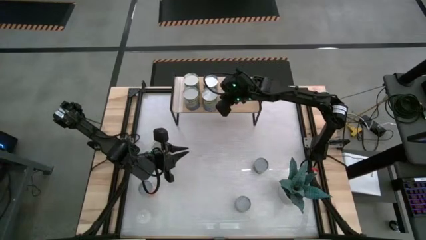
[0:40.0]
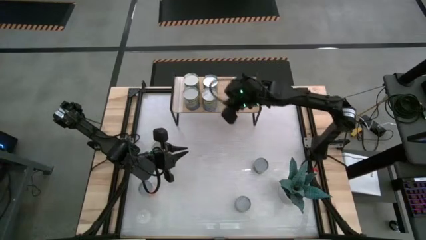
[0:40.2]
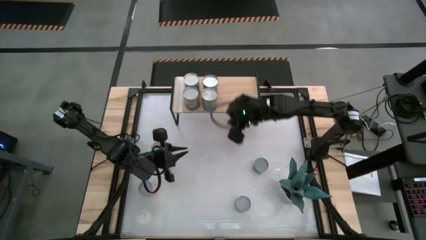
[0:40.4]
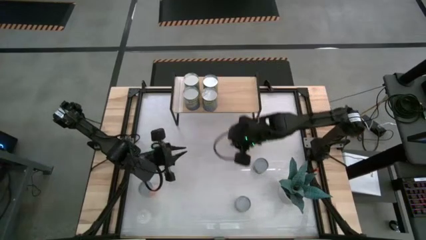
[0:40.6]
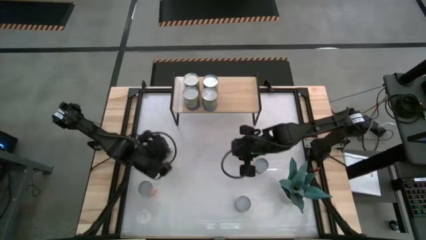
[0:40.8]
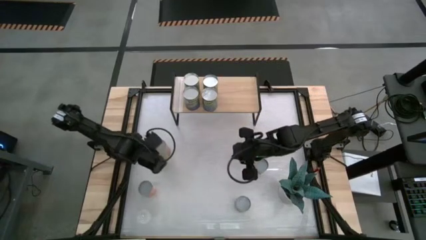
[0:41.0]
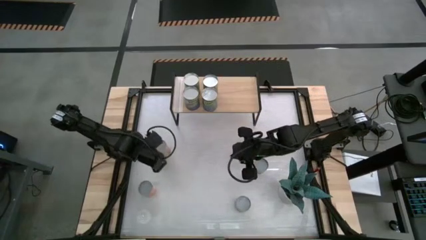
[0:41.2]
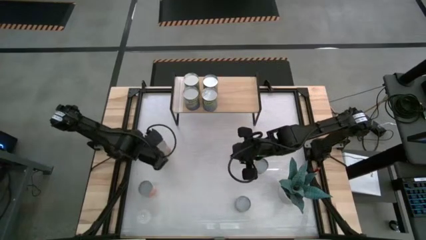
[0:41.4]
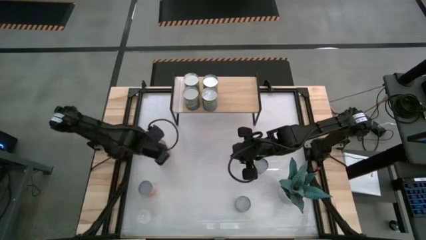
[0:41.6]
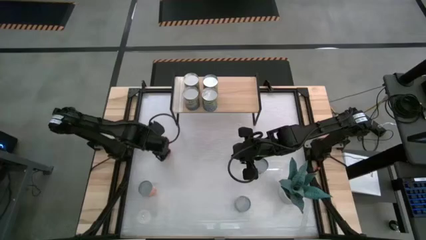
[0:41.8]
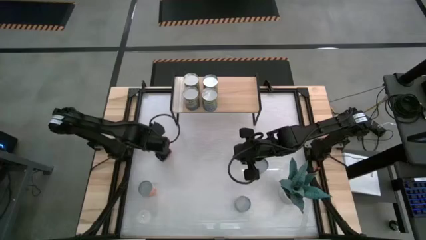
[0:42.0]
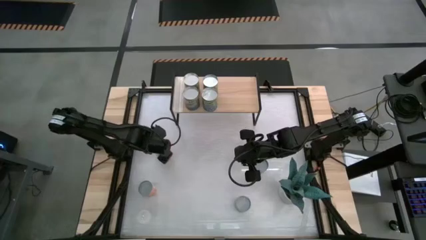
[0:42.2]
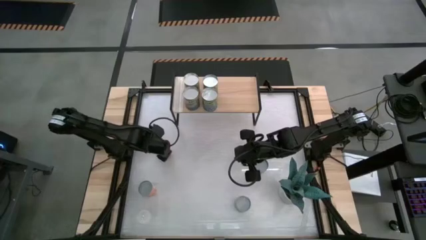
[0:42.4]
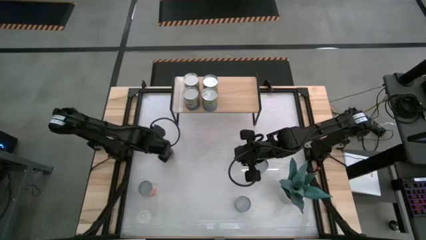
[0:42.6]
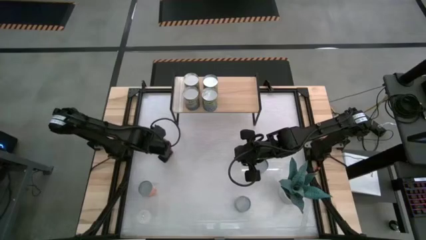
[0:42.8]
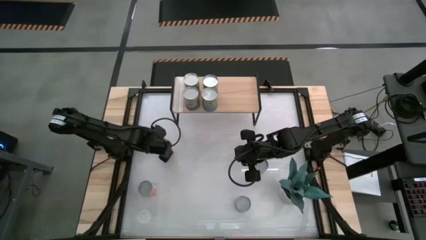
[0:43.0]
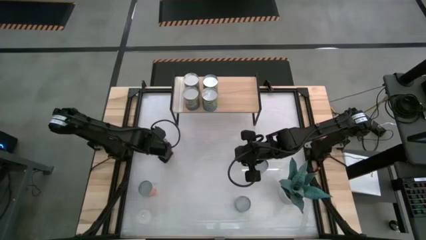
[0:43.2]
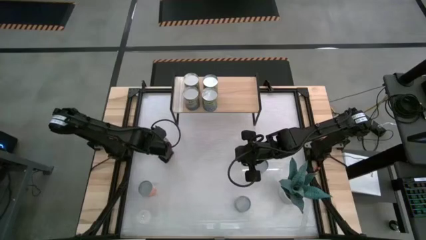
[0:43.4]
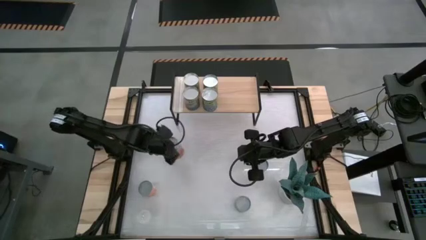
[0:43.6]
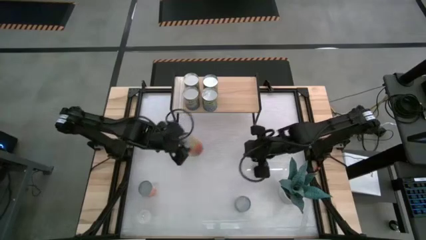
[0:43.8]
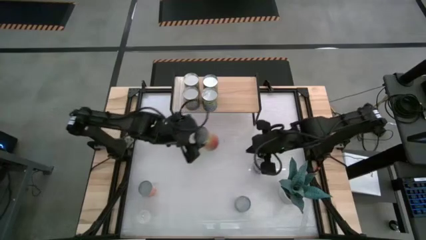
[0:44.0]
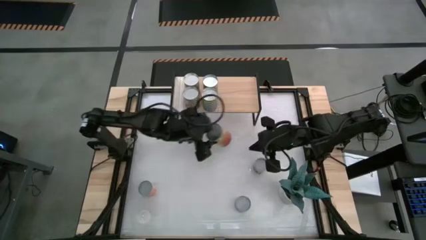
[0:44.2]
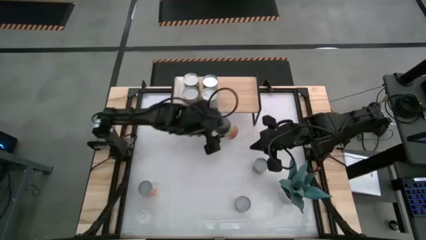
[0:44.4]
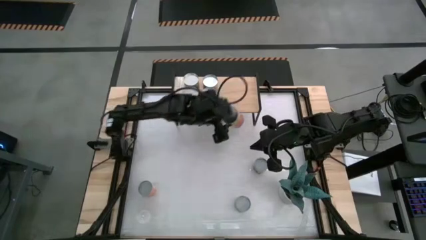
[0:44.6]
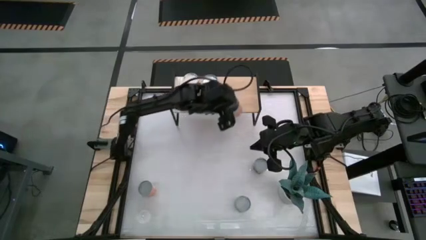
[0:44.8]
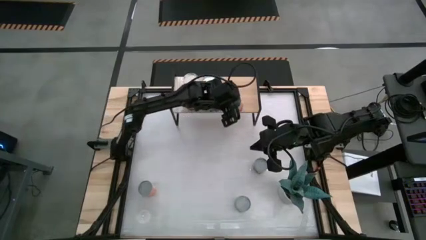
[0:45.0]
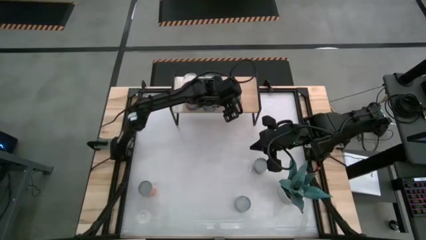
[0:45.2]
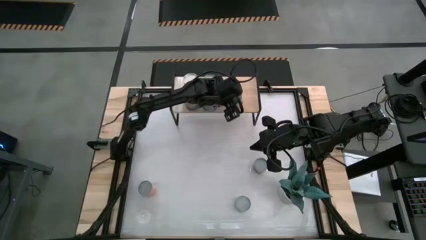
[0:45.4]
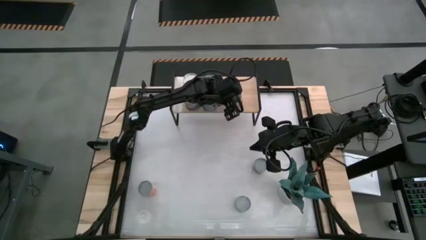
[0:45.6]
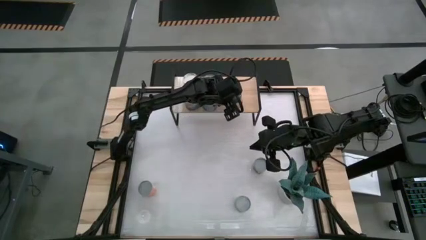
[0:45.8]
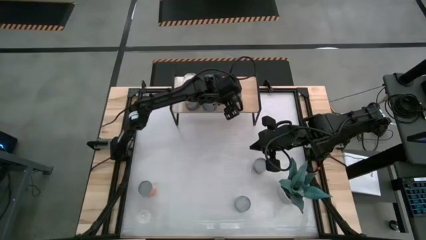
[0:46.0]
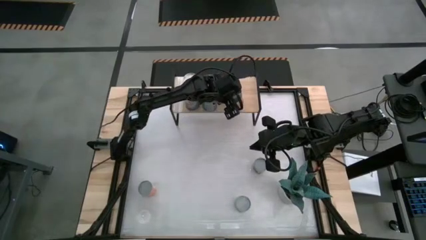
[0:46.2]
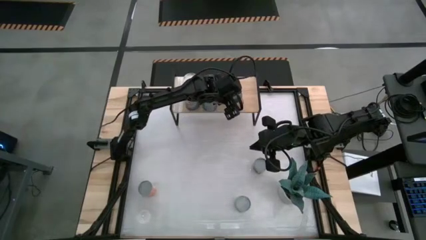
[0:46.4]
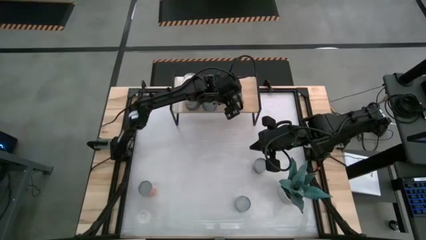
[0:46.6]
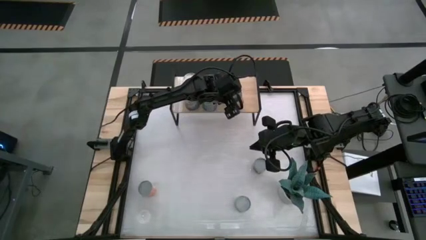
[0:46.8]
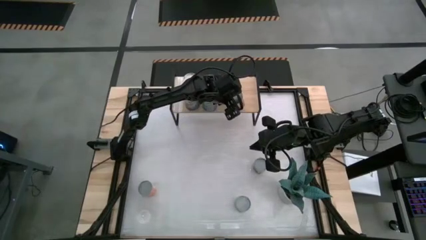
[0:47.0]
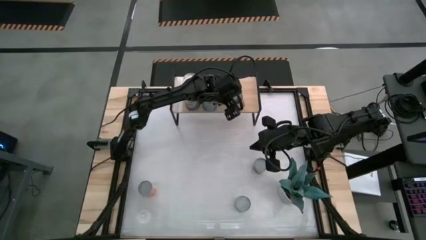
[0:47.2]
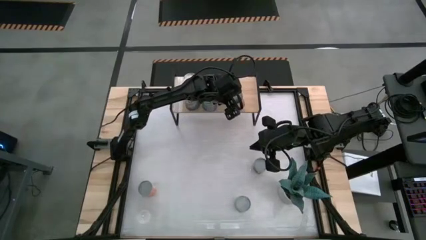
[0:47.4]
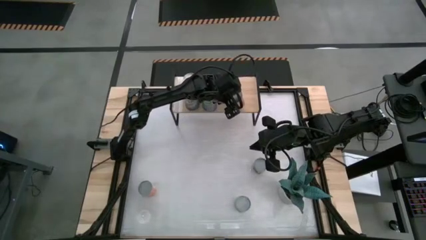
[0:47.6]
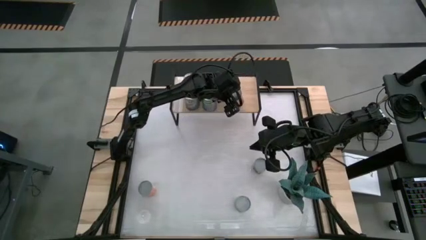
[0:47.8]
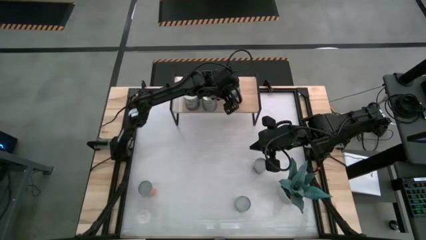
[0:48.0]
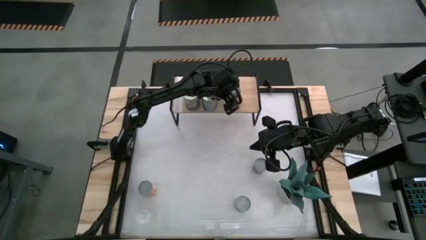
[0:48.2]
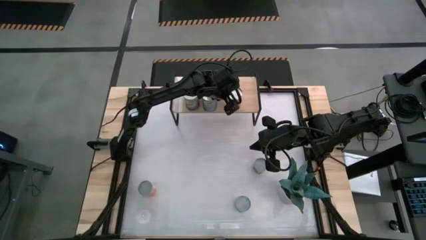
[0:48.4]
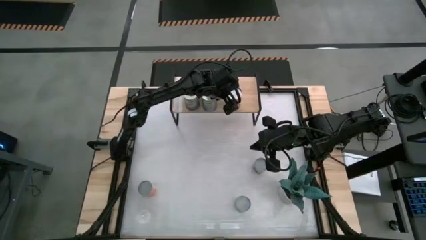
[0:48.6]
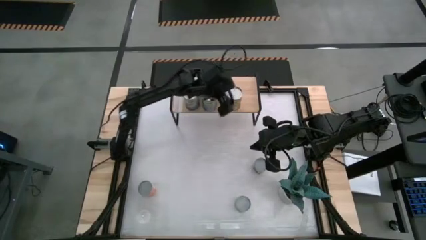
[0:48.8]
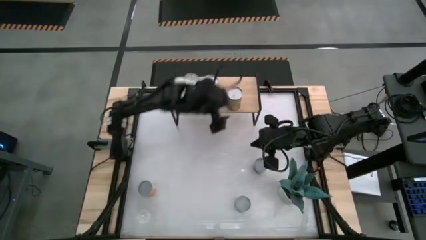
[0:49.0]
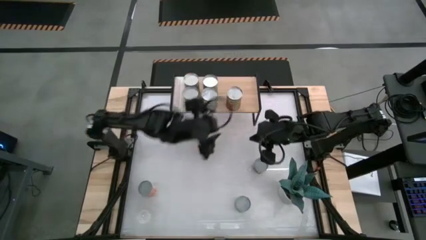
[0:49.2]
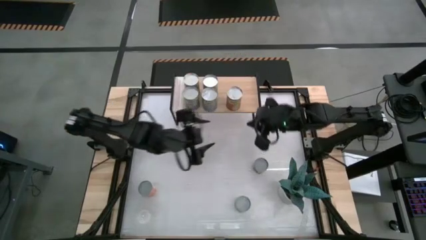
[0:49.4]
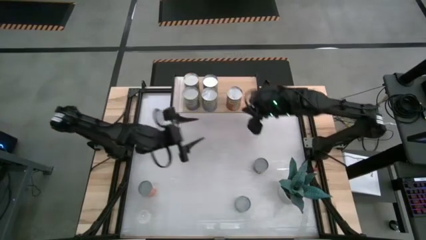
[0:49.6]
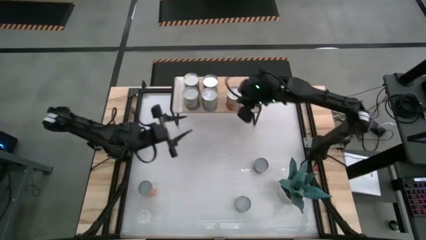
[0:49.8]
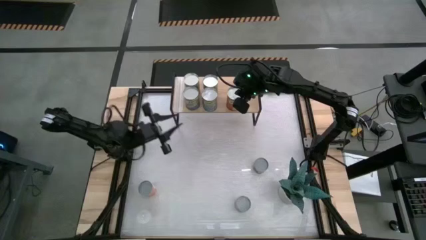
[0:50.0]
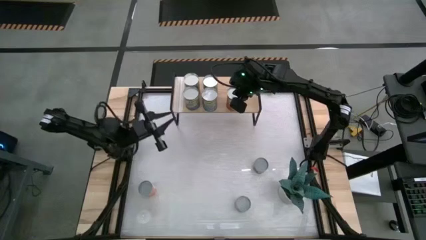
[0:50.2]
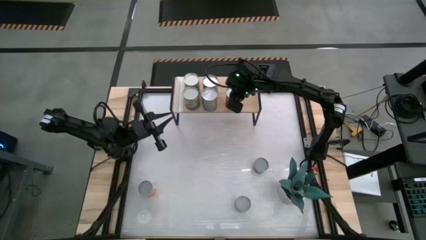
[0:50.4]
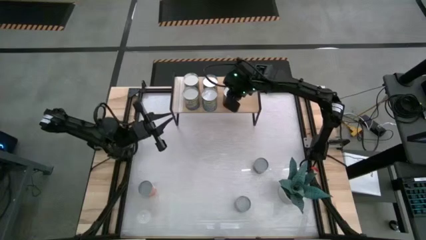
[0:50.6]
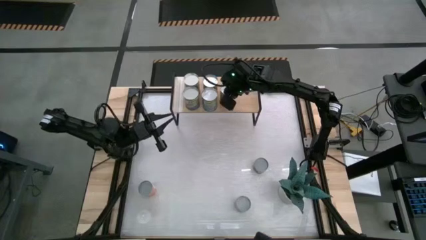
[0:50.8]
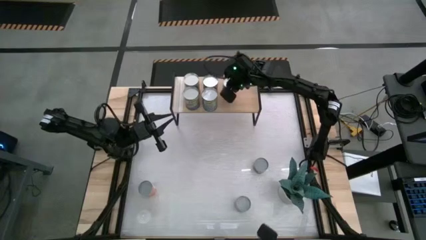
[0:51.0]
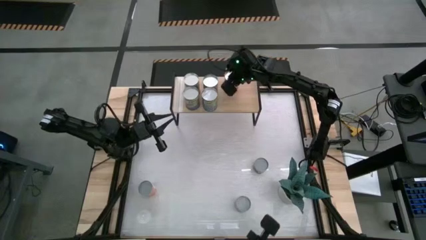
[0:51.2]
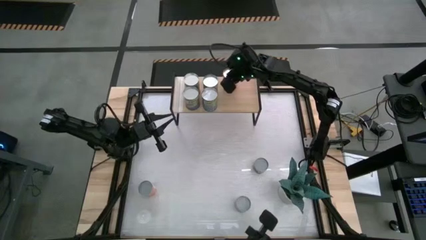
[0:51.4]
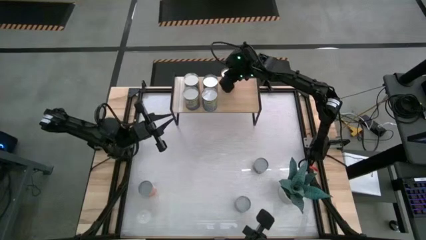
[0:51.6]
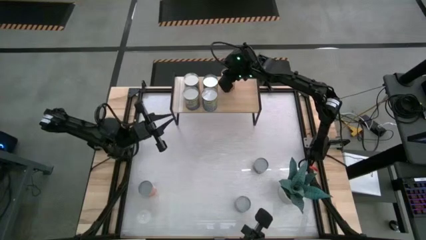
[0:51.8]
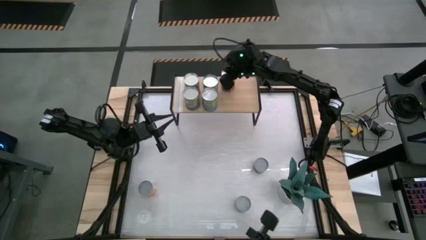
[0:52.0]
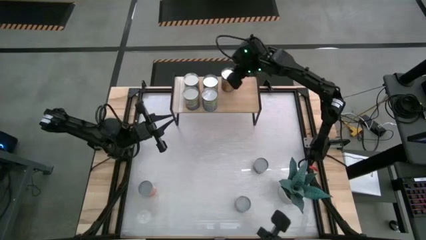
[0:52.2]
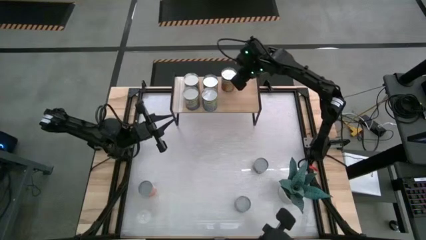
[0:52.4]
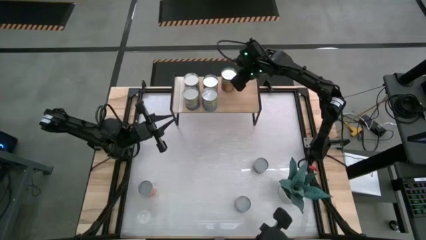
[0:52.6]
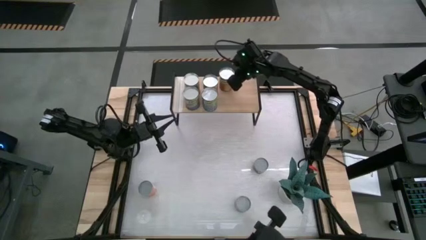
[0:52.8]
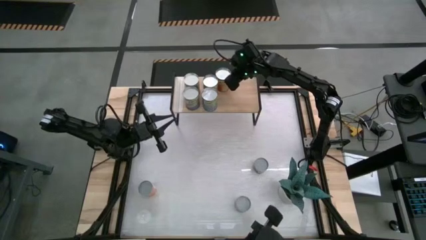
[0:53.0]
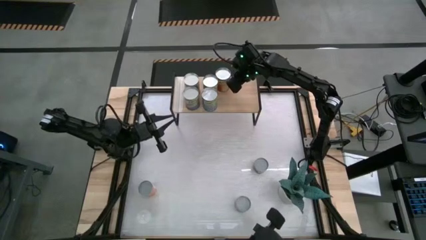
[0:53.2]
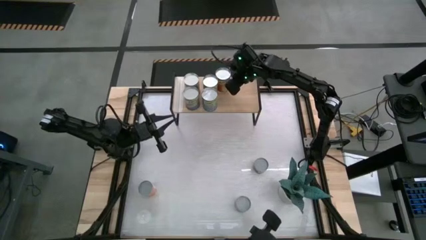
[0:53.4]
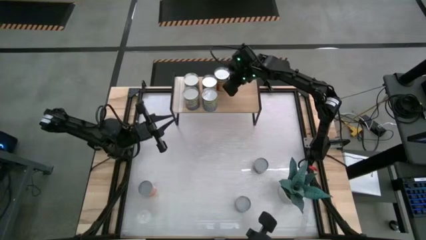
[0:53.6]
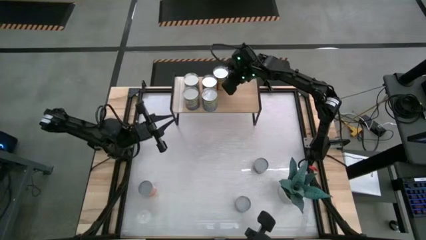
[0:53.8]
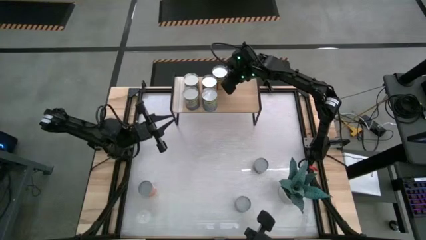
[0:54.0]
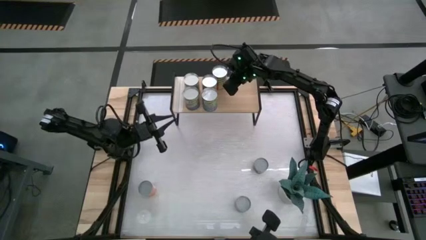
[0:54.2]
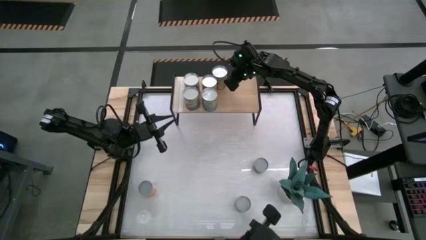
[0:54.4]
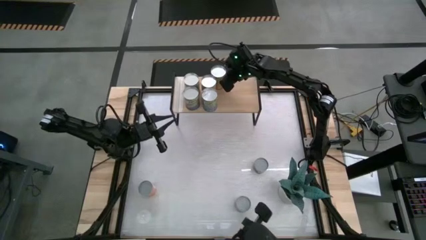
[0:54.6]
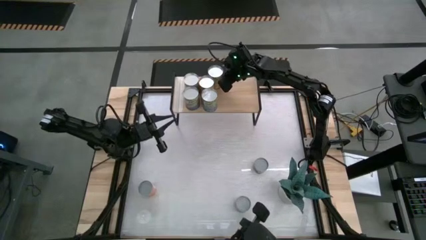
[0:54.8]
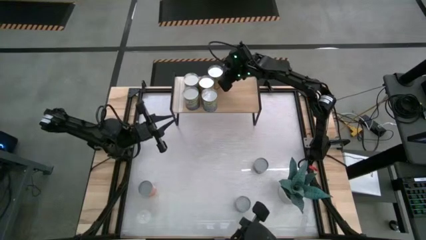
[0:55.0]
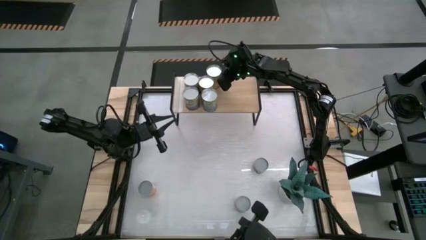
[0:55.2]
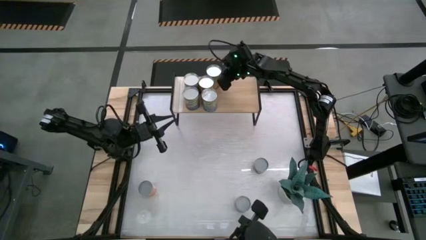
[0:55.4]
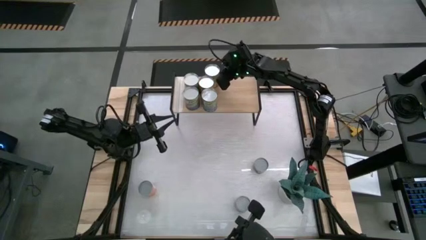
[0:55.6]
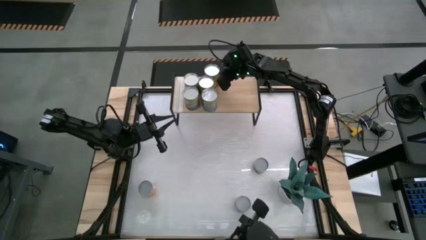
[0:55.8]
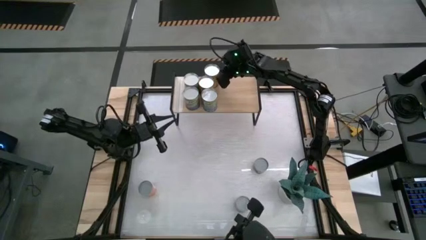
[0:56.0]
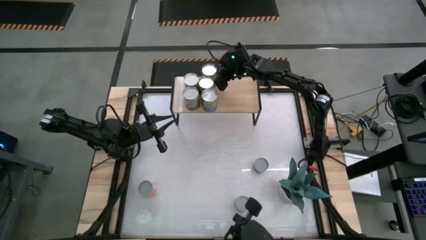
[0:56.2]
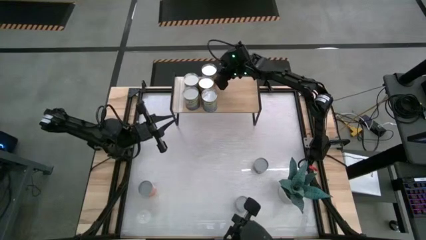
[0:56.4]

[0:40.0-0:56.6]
Task: Pick and place cans onto a shelf
Put the canned pineapple on the shelf
